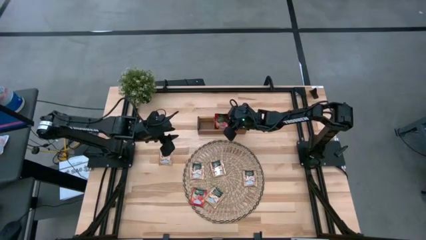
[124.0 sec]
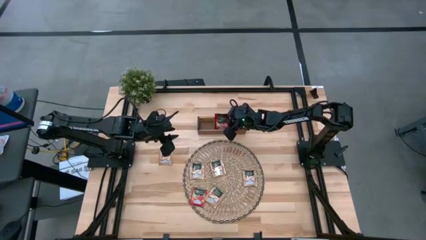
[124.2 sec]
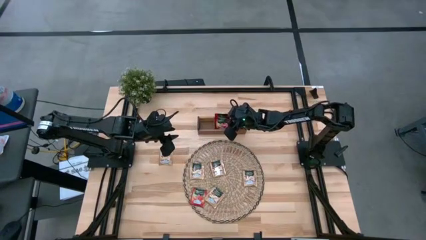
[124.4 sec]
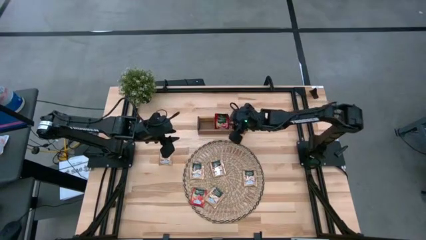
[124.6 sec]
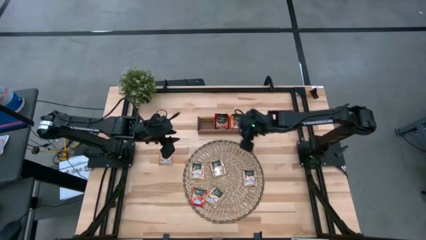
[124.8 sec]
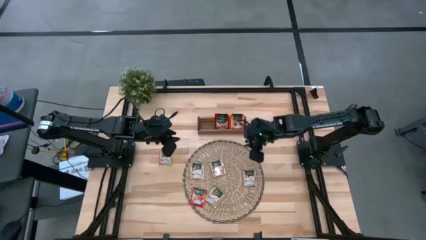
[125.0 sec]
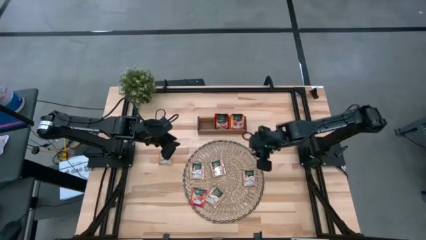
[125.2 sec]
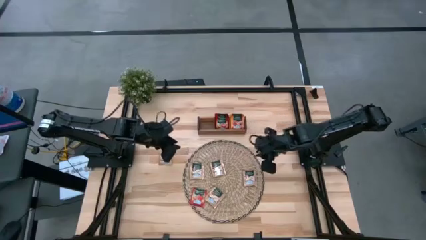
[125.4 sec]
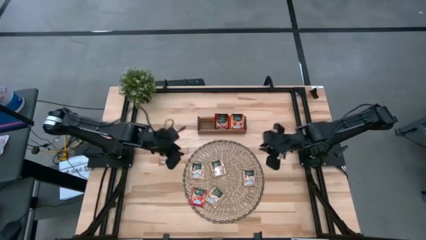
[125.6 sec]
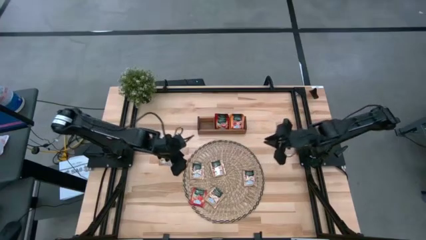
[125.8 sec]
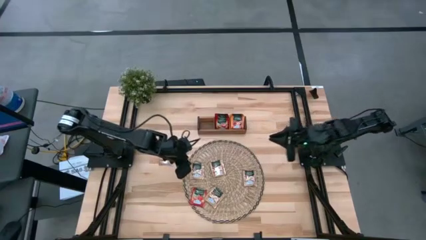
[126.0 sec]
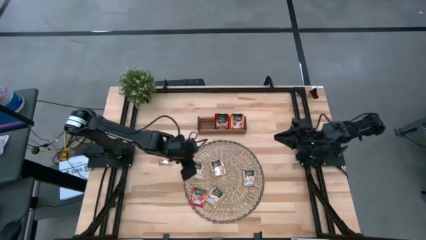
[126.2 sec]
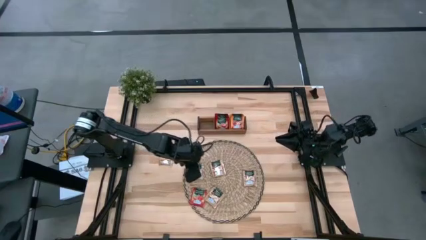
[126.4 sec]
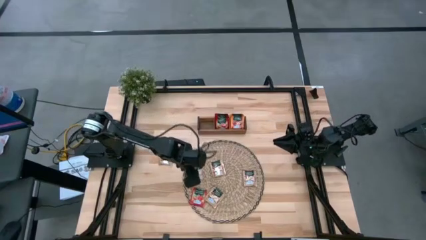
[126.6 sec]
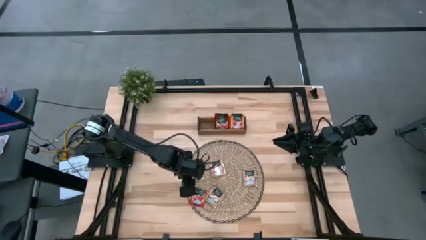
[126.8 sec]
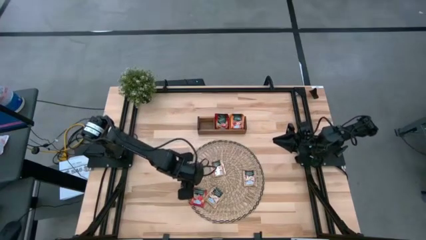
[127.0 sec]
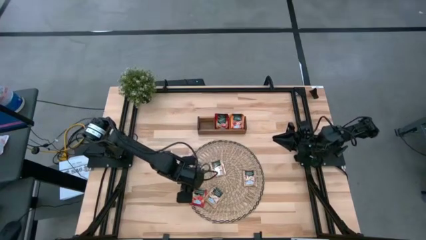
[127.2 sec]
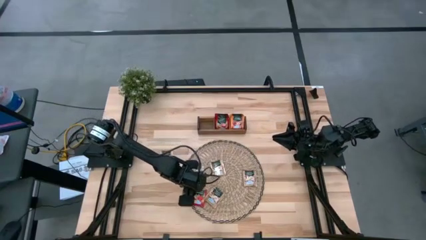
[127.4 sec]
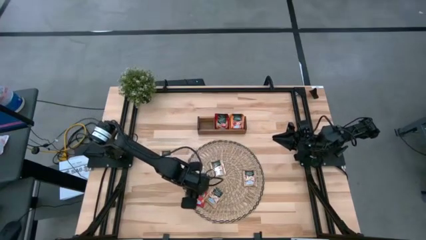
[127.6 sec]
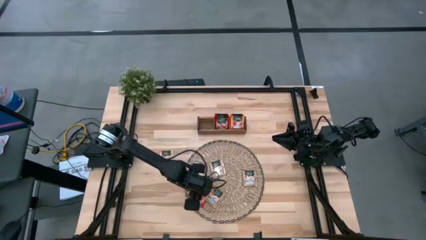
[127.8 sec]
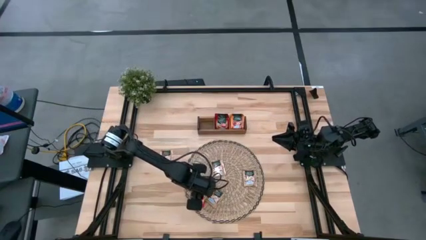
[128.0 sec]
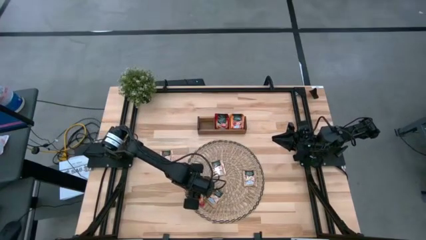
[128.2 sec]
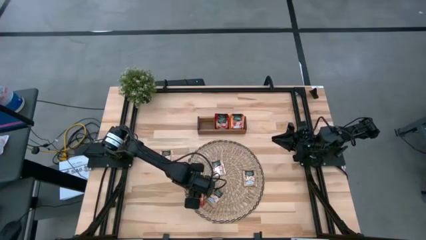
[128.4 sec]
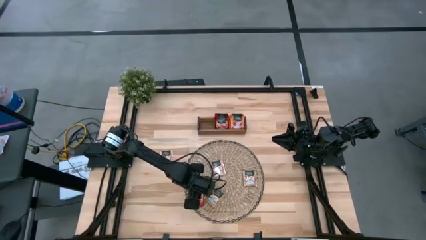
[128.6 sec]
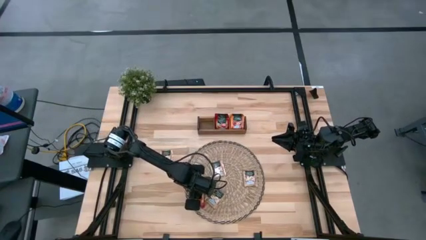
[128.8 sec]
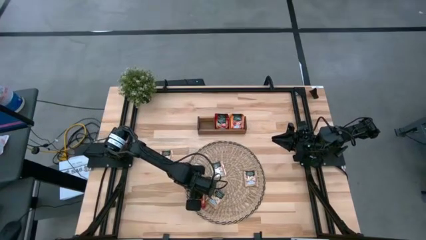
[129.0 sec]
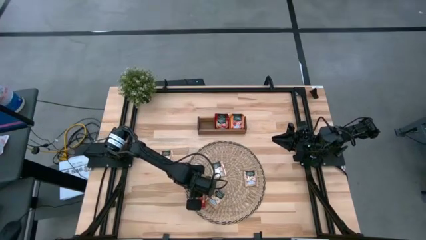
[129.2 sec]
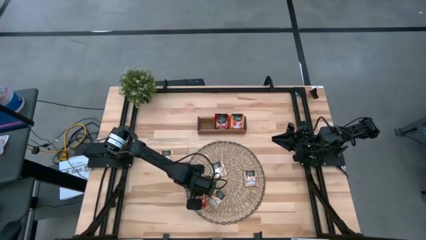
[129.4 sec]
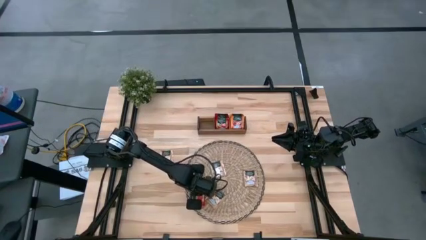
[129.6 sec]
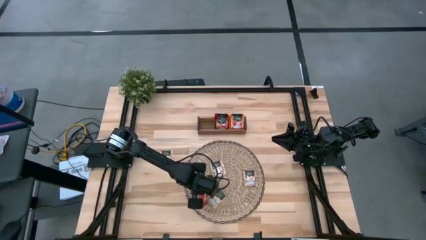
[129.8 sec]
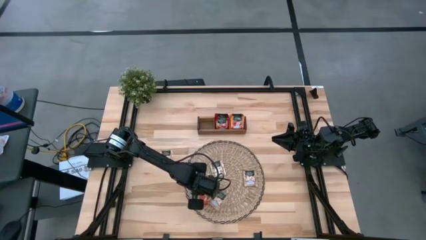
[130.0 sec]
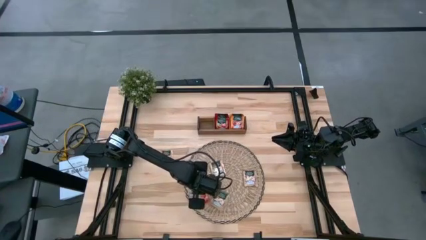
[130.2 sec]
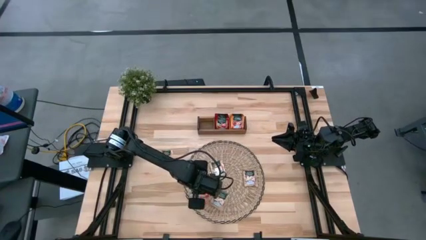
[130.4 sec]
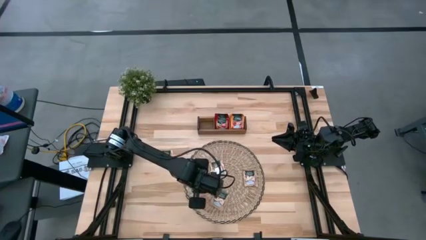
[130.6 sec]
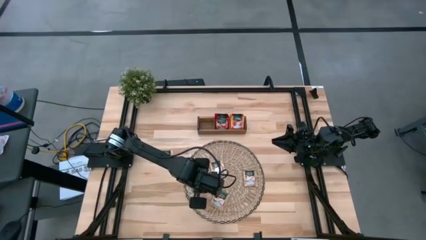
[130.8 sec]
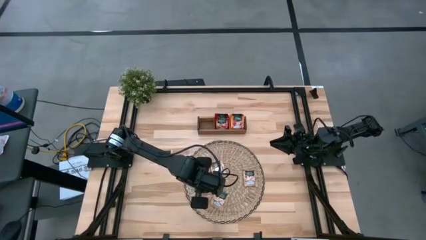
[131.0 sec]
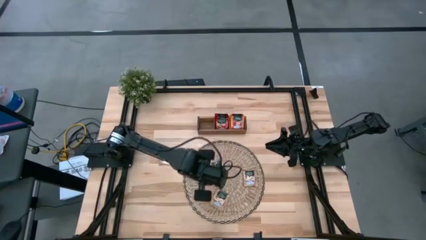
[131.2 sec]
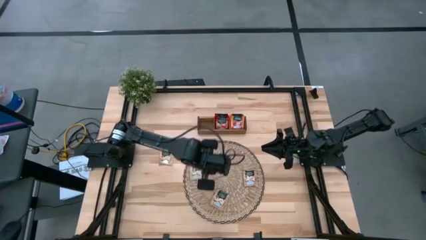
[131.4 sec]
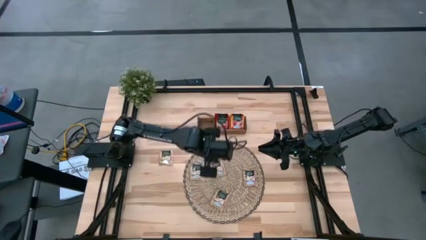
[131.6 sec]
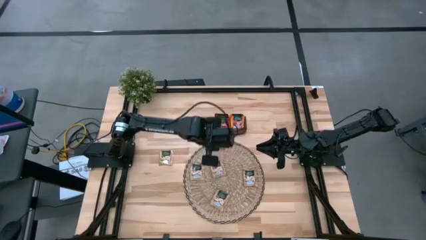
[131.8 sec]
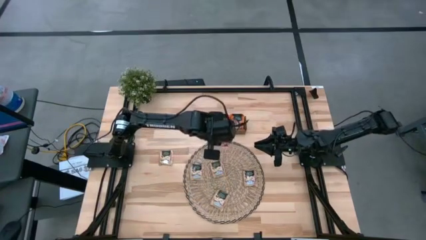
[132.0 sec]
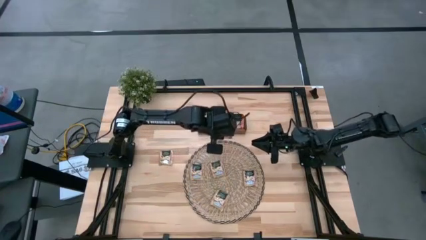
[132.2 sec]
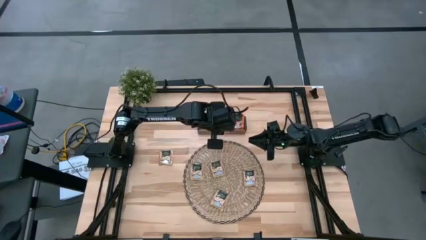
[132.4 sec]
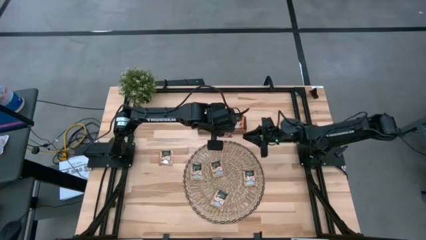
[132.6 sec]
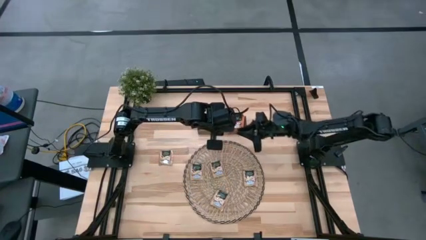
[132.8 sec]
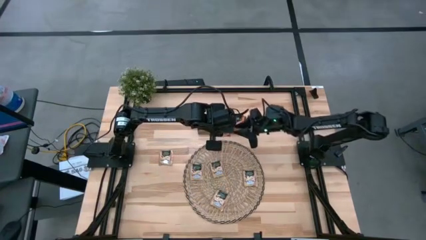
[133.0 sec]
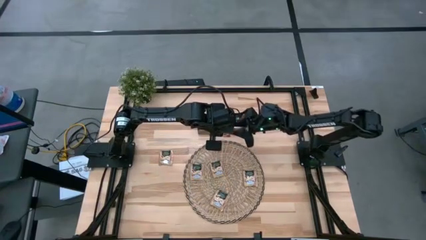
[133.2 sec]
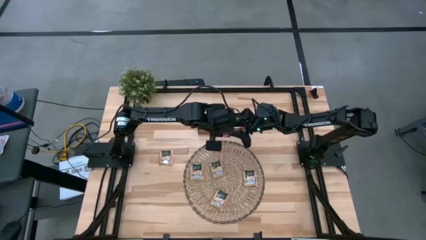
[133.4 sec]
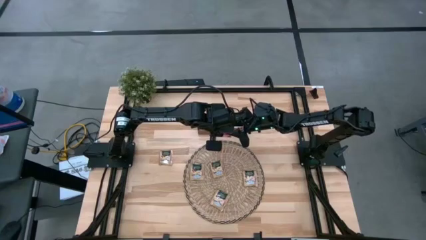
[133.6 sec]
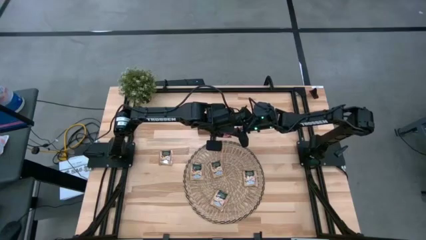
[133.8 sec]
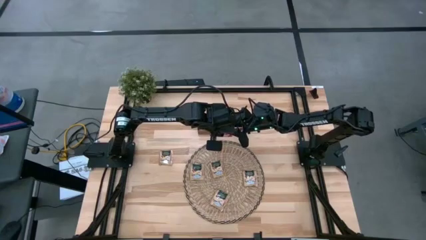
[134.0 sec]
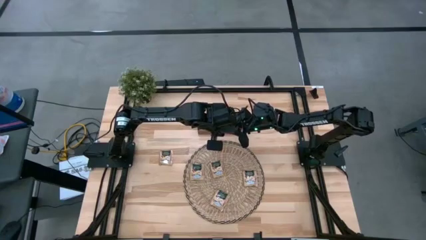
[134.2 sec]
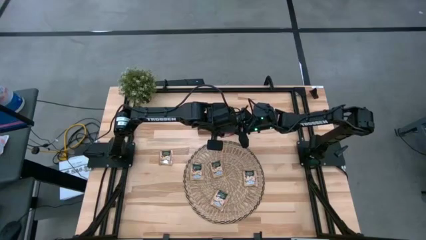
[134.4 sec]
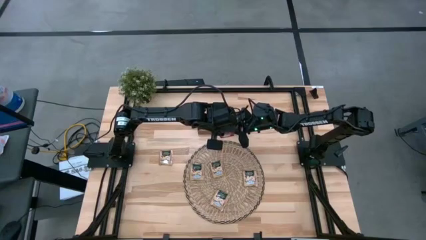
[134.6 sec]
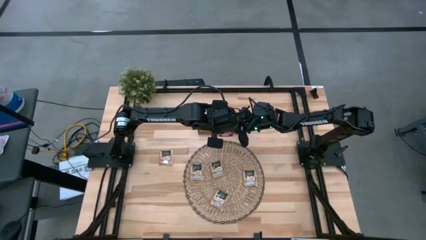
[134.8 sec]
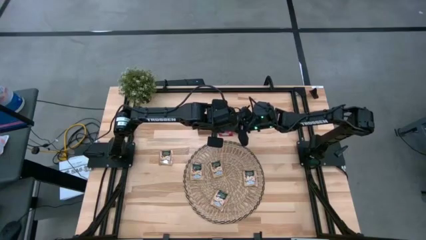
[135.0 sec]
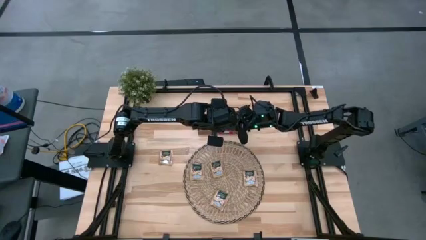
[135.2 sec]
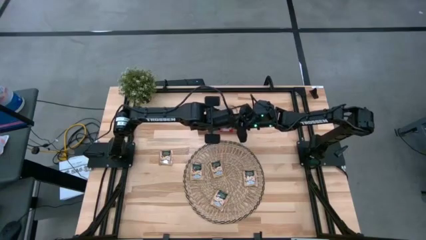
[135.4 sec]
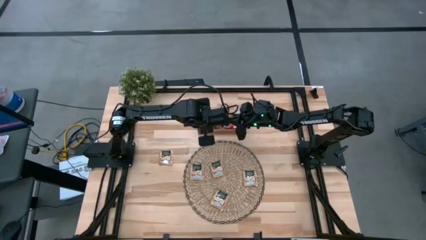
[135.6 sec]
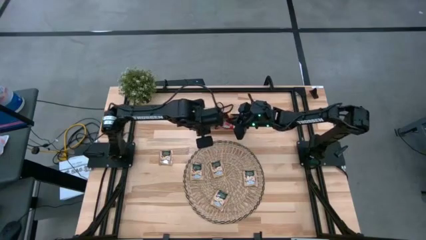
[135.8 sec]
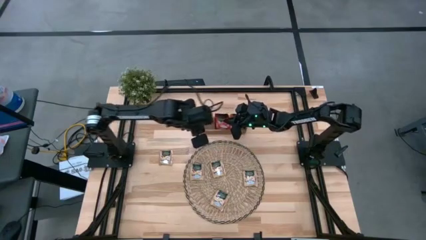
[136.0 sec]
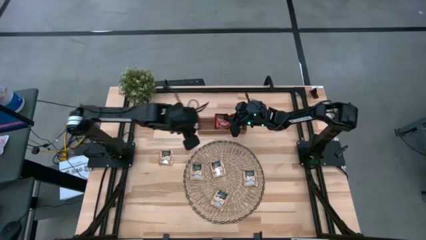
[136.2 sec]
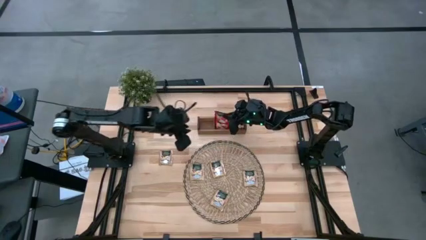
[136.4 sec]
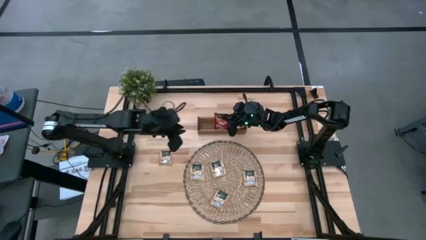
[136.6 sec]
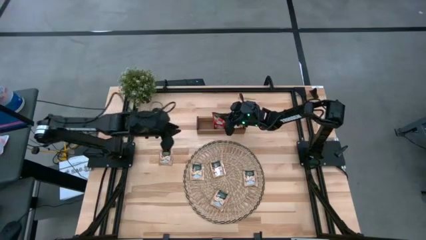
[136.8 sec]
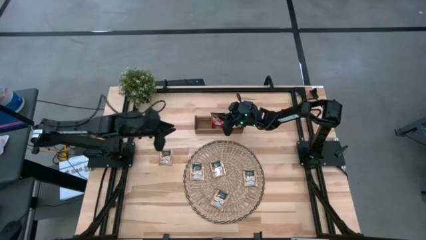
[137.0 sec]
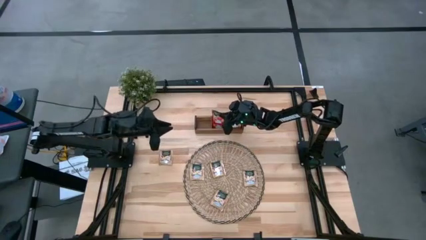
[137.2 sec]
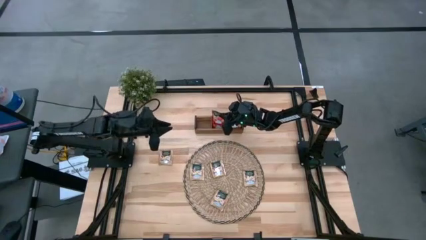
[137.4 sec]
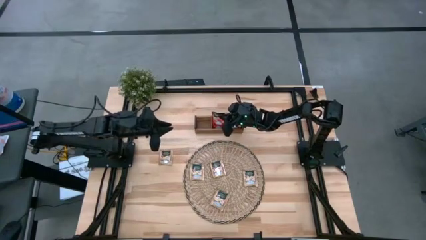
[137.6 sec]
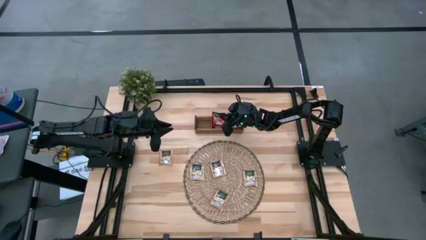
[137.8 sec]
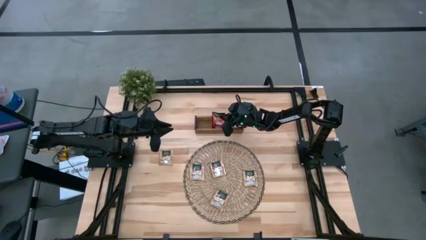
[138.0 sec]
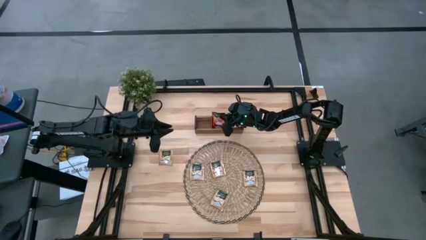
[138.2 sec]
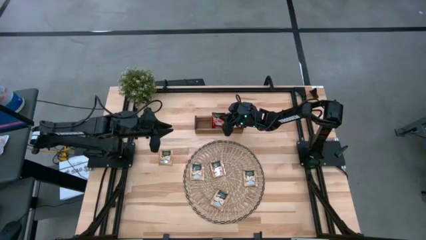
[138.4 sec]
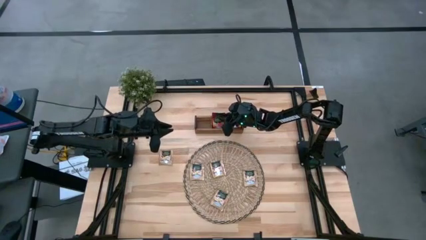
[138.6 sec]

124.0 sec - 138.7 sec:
Task: Pick & Place Tea
Put the red tea bag in the middle of the wooden organizer

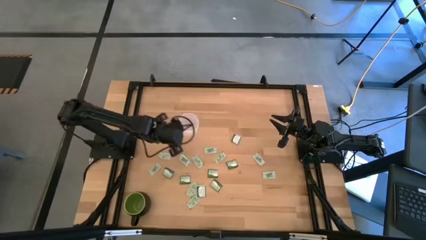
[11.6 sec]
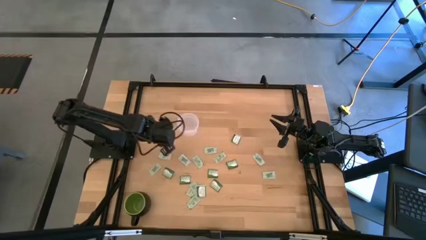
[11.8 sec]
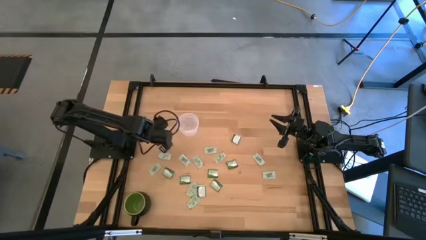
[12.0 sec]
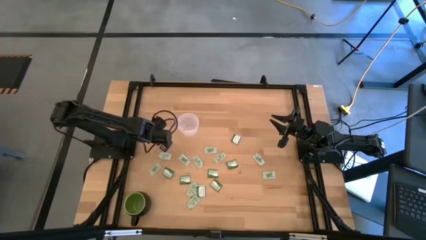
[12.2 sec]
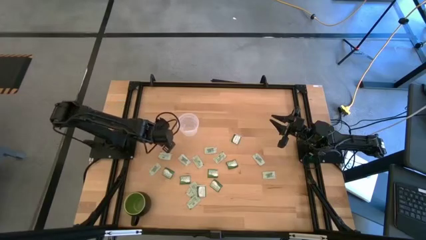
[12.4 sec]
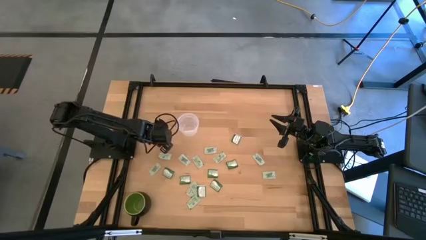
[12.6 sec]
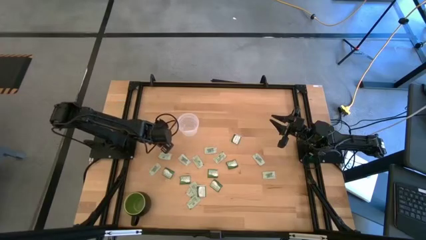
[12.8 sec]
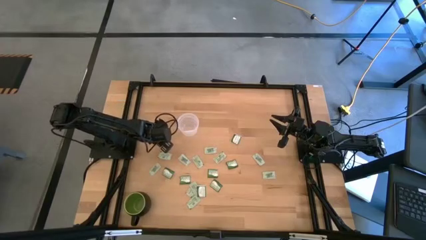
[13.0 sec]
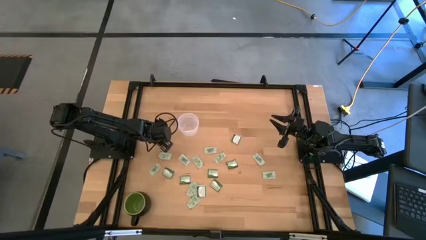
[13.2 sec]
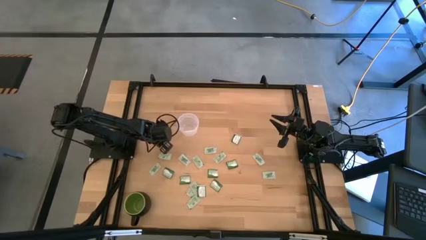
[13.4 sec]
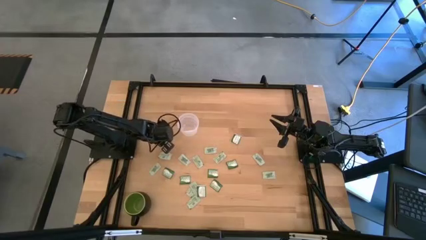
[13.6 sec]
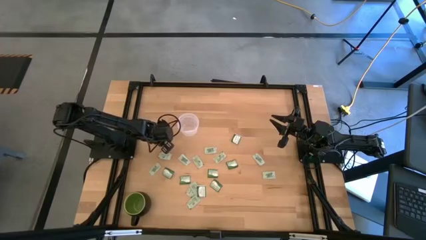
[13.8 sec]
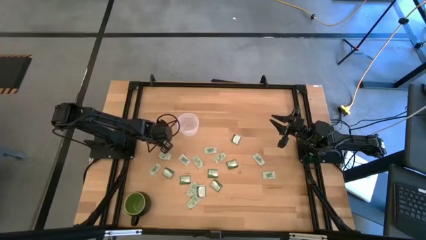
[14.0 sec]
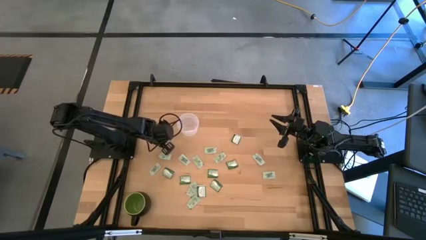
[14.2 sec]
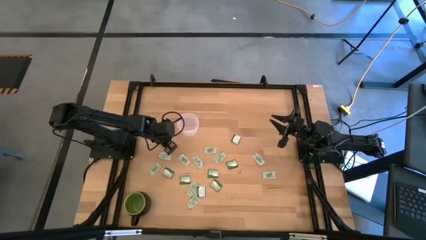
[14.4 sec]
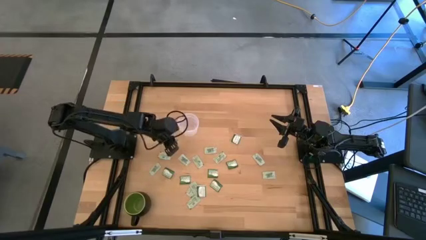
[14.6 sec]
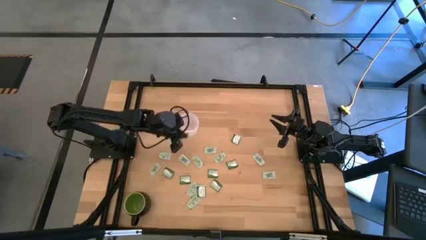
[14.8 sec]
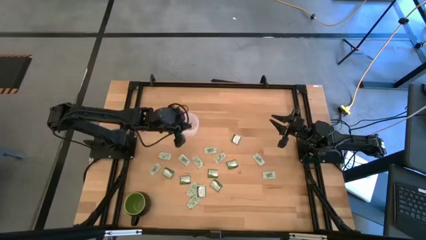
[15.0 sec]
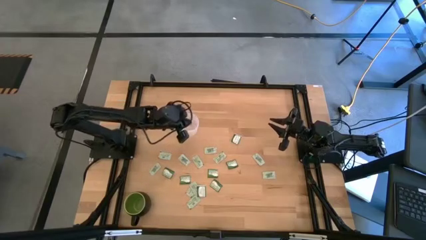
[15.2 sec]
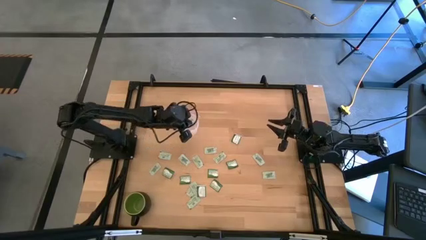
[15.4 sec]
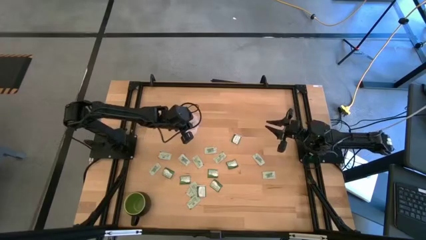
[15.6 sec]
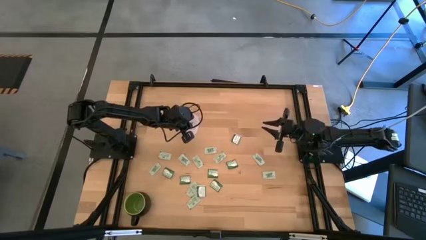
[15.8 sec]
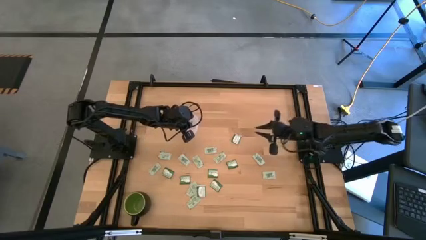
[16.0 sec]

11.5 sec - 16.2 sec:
Task: Pick and place Stevia / Truvia into bins
Put the light green stevia packet into the transparent container
